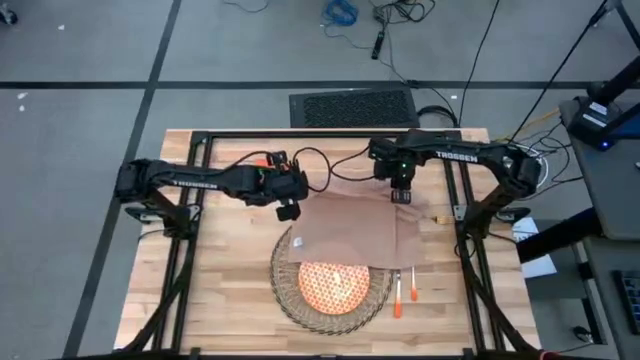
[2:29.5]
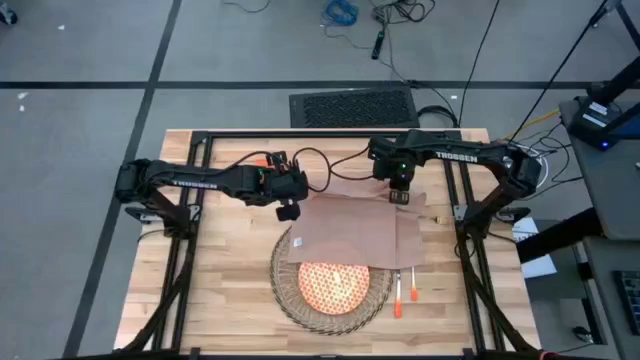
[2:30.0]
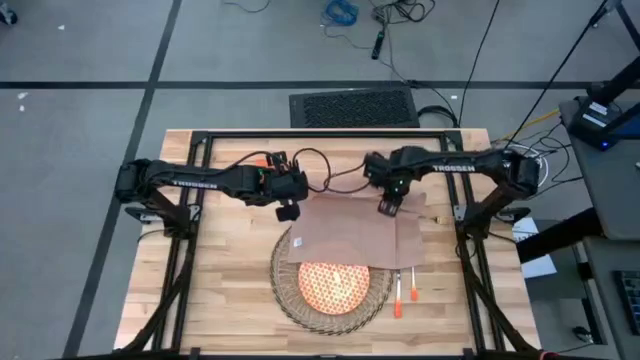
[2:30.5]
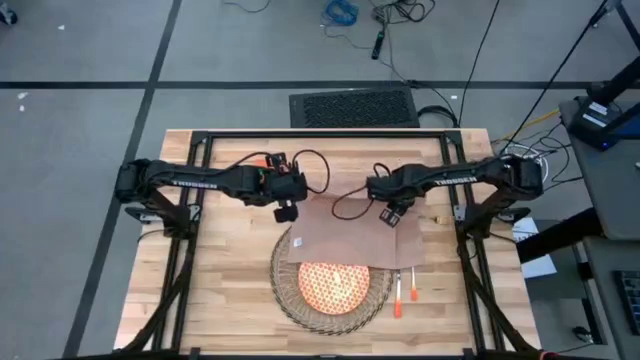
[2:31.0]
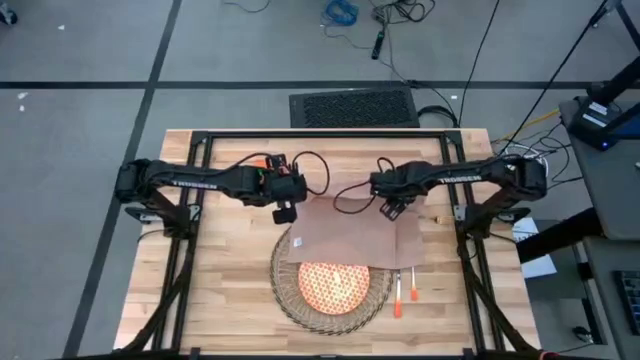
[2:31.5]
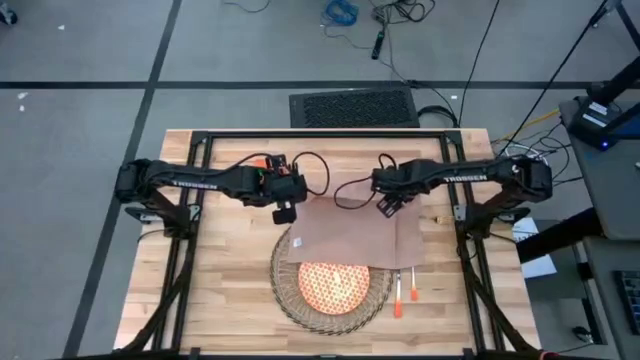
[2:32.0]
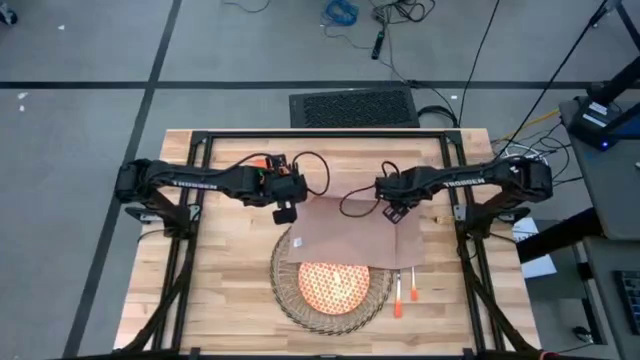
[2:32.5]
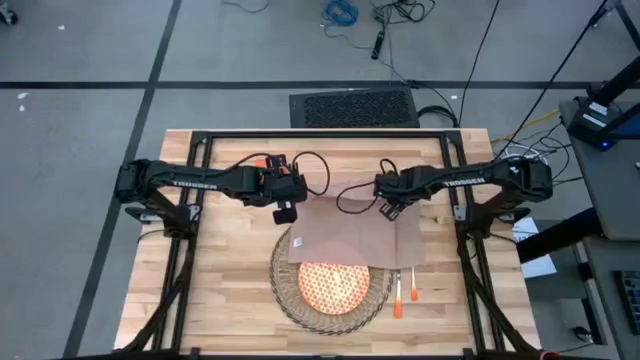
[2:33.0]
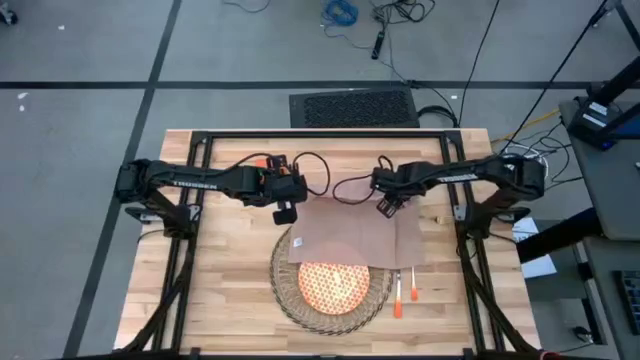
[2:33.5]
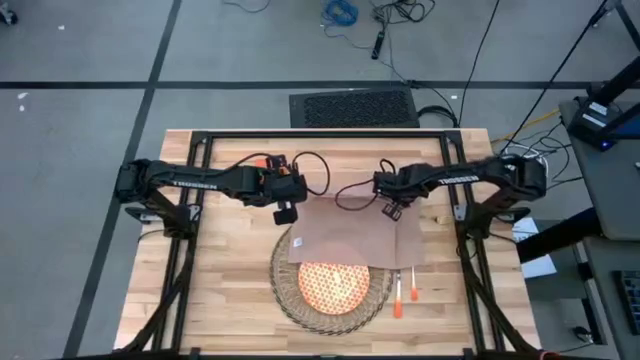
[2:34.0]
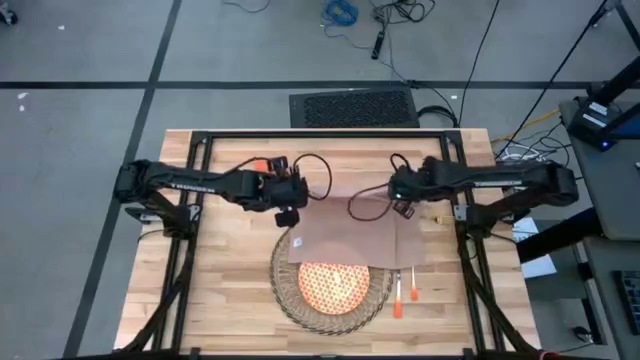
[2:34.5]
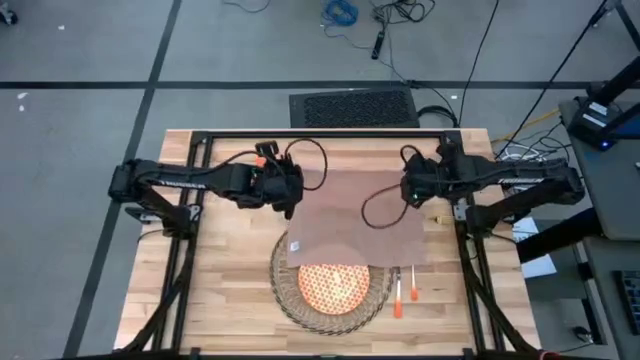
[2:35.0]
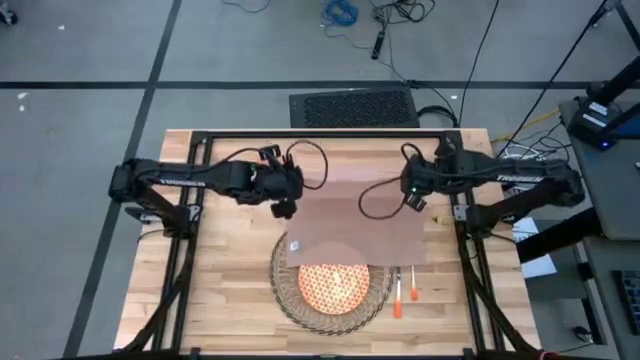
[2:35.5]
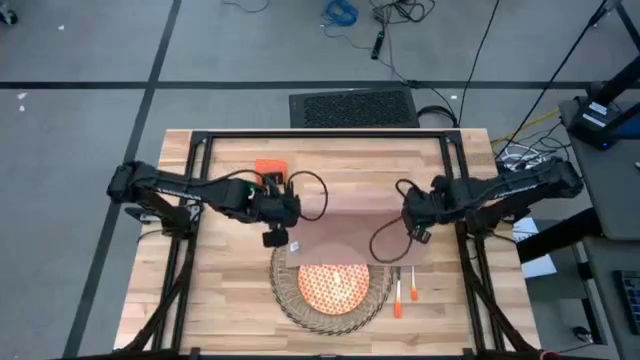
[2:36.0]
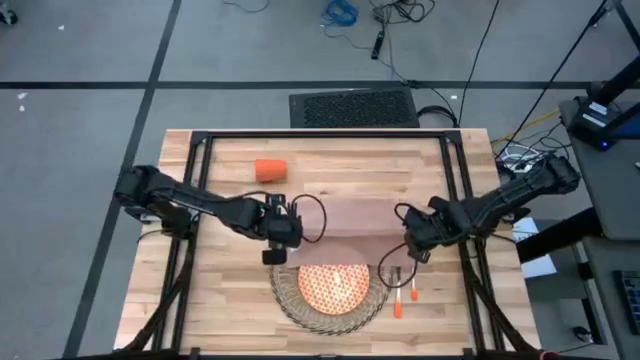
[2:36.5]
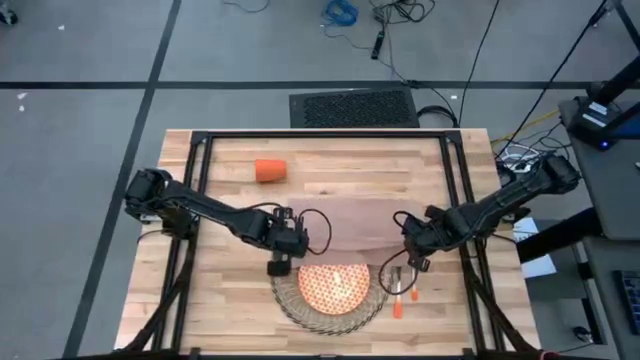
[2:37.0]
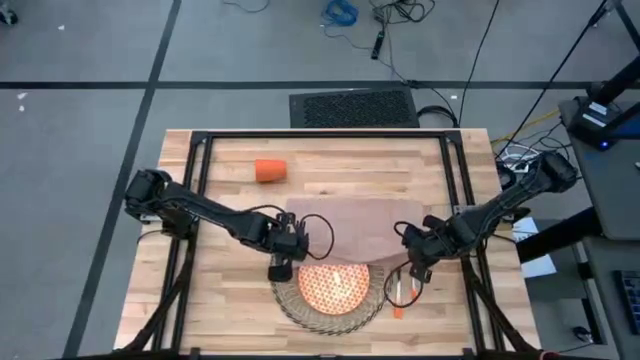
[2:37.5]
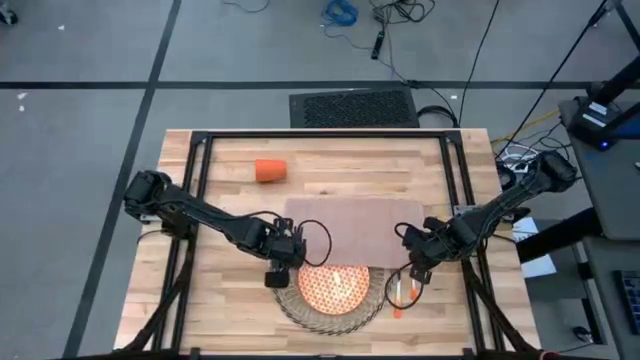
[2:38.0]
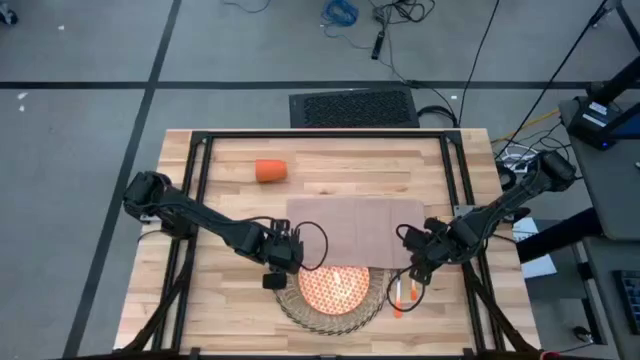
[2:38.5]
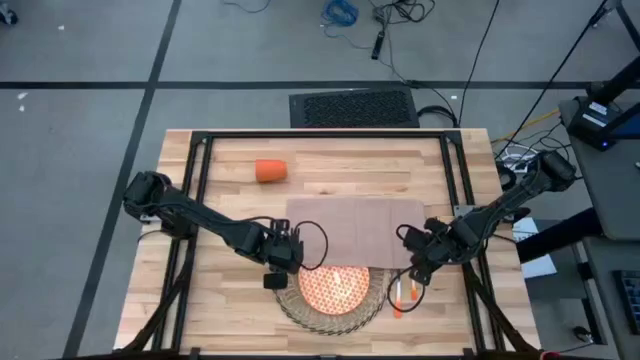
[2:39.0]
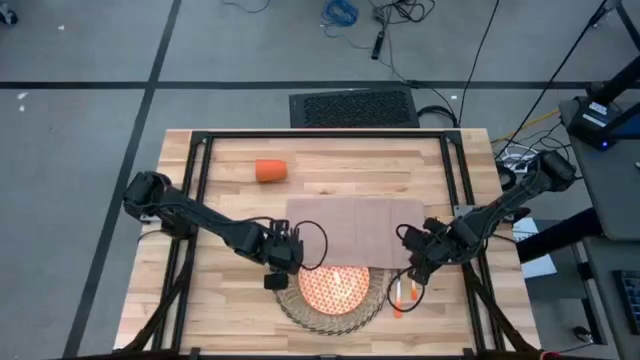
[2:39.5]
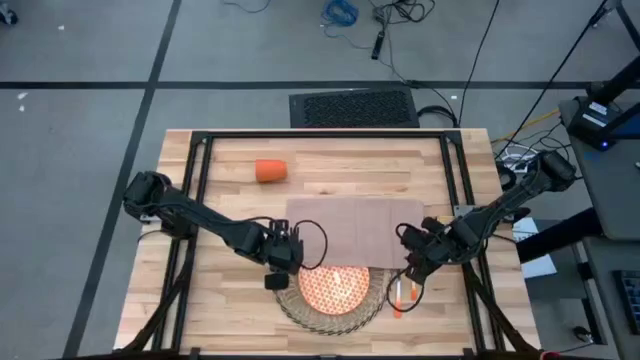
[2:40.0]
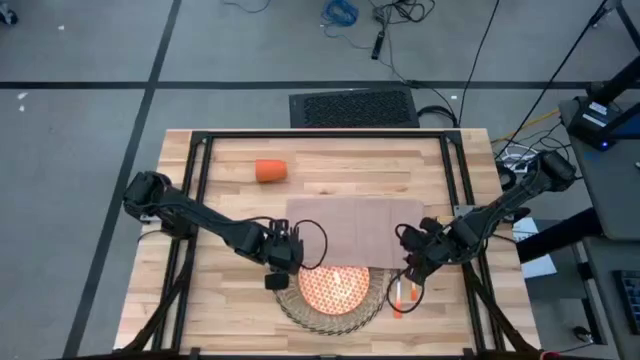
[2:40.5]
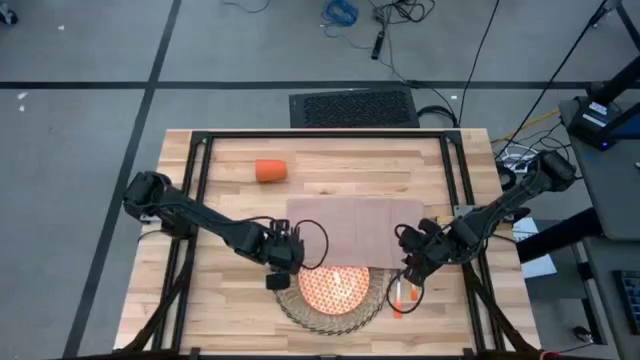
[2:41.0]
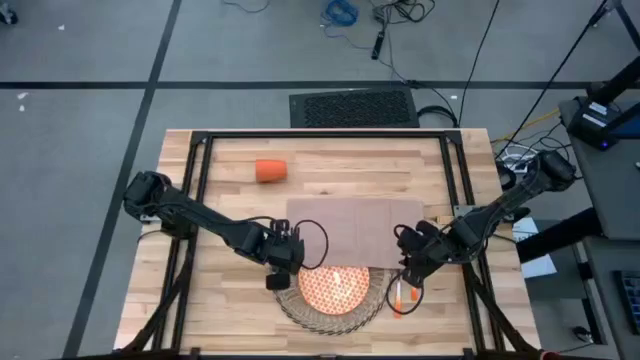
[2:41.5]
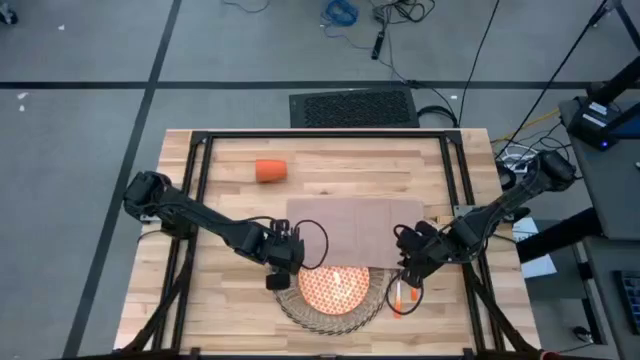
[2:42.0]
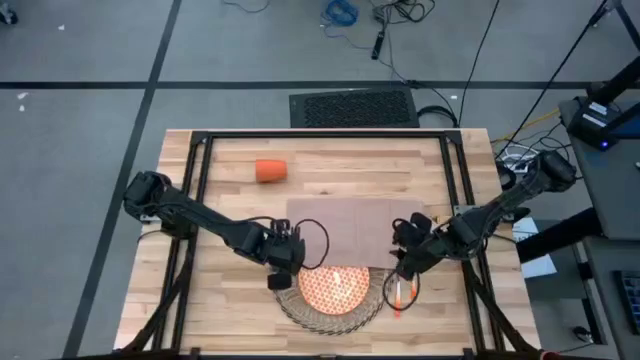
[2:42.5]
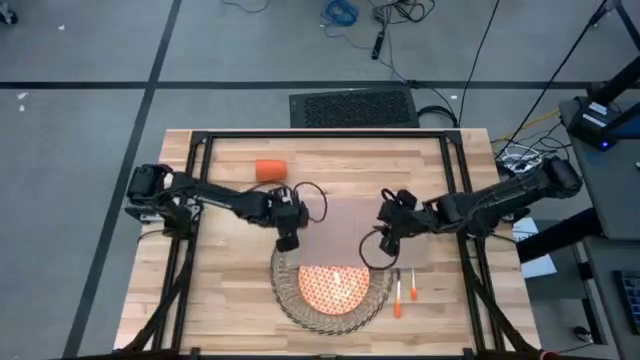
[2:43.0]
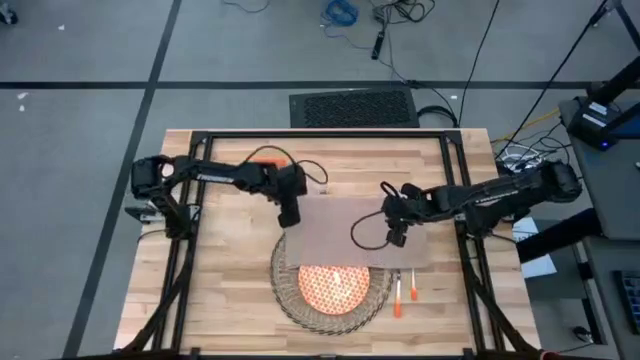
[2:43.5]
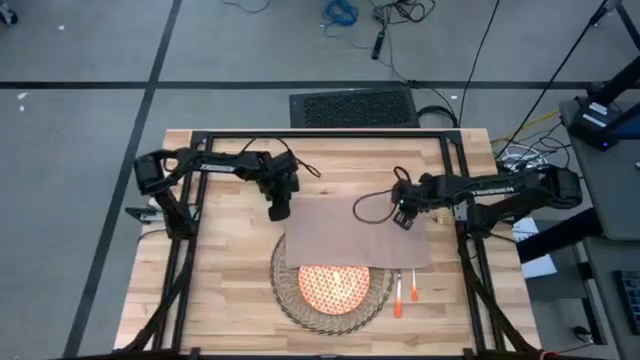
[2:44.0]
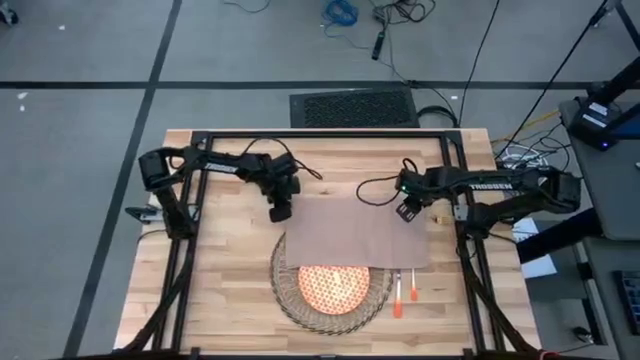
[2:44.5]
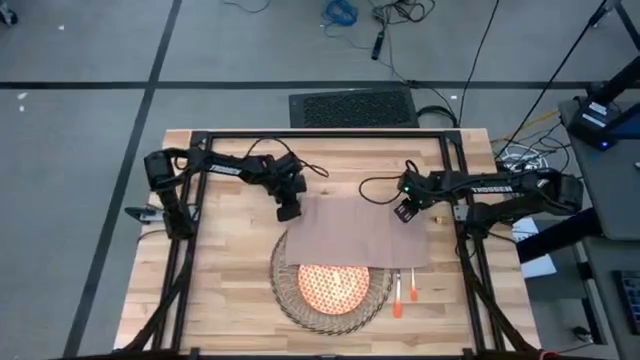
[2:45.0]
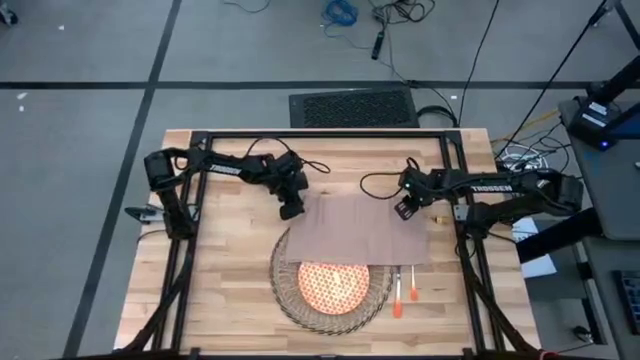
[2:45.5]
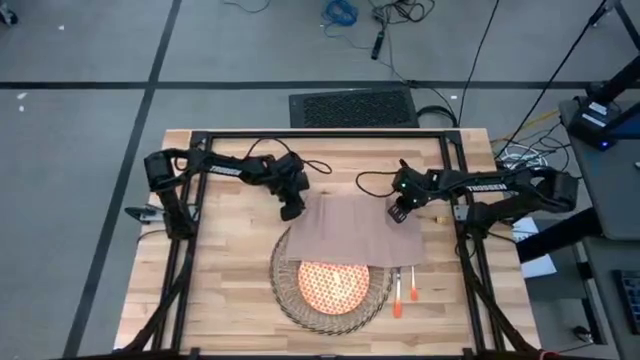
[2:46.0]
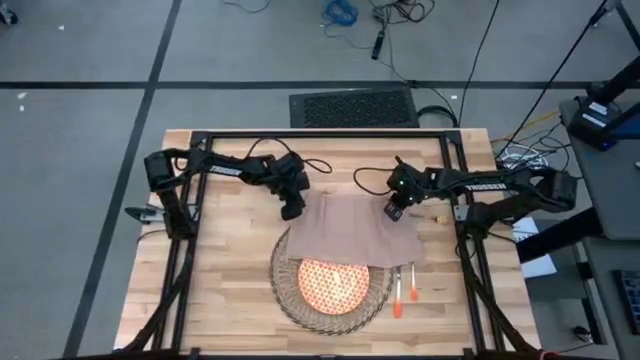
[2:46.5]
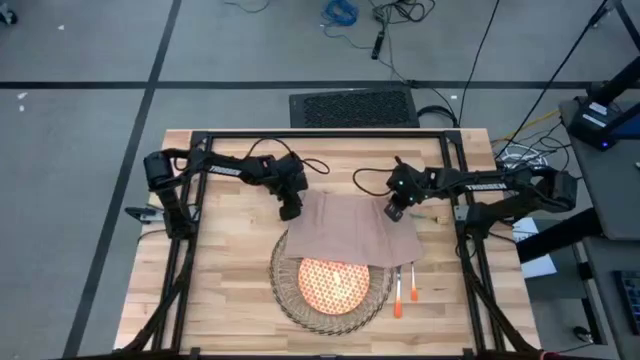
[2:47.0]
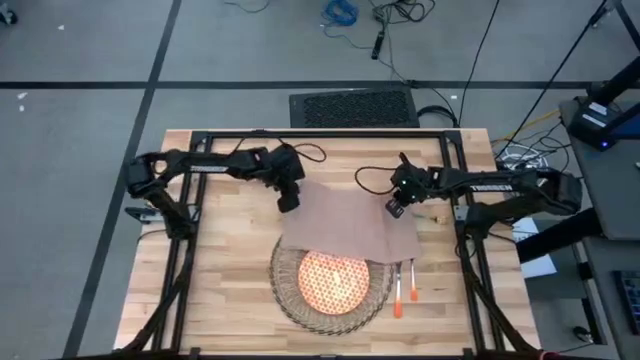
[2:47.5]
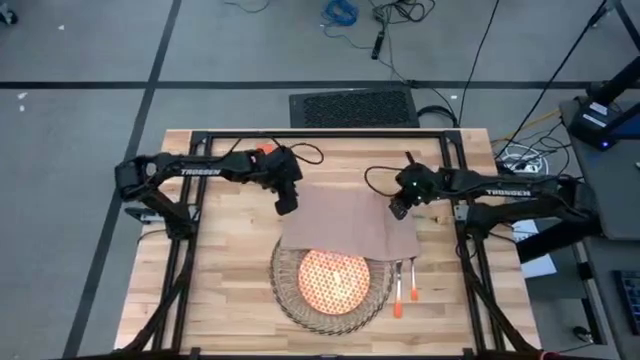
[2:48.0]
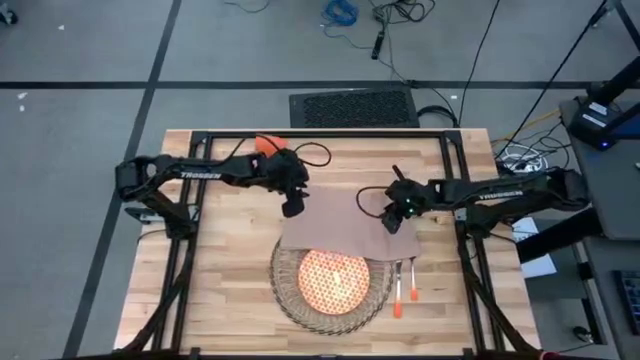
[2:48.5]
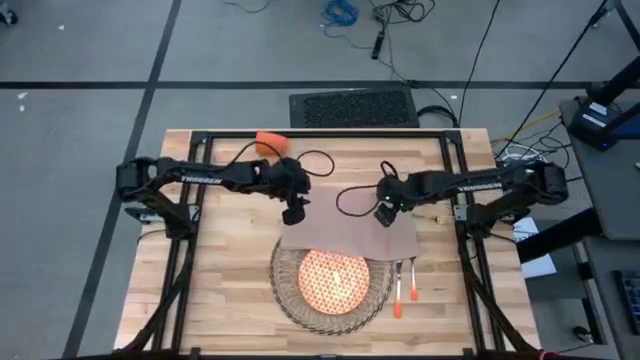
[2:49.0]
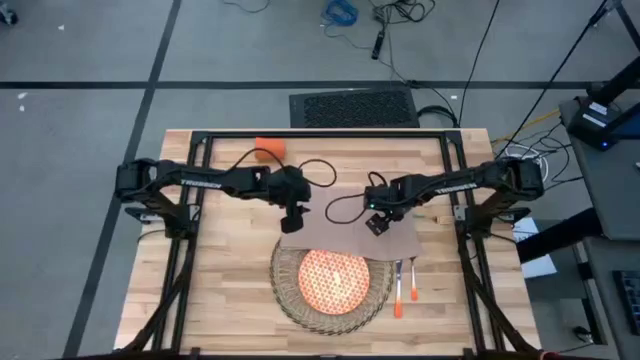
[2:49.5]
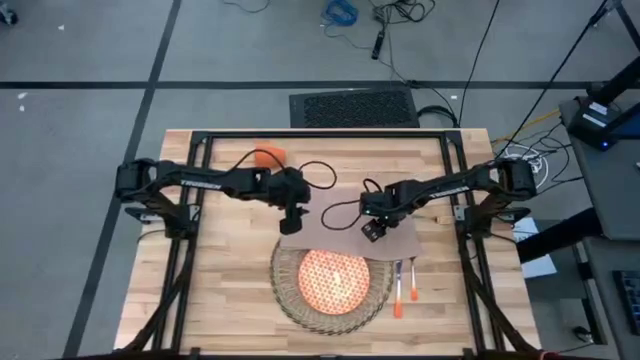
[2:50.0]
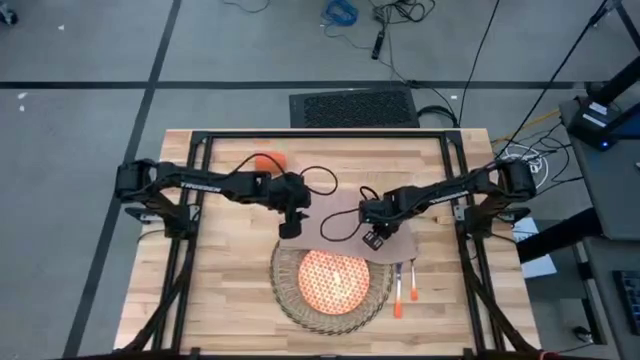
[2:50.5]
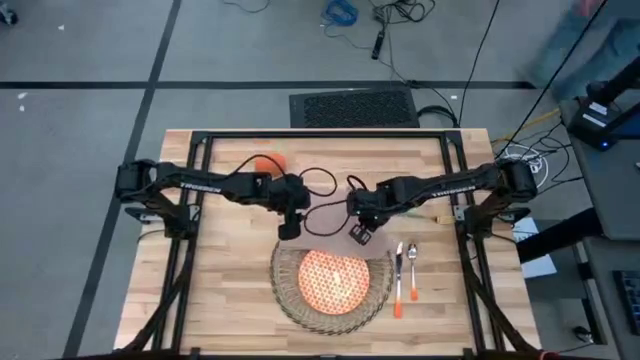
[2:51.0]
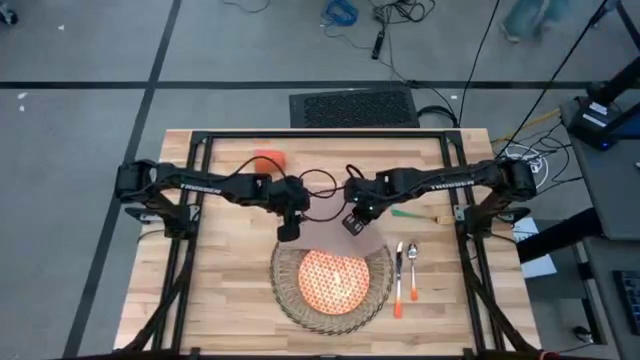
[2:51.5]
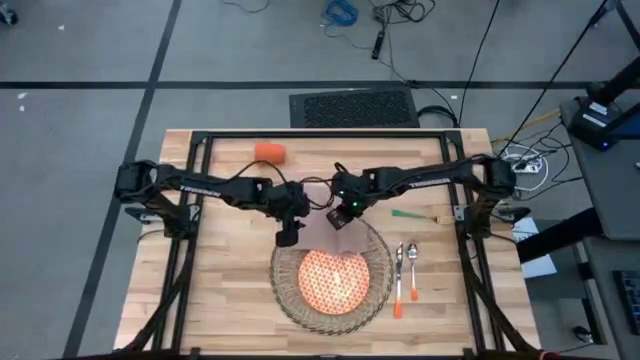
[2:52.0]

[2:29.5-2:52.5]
Task: Set table place
Fold the white napkin
